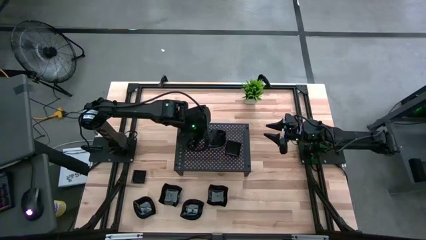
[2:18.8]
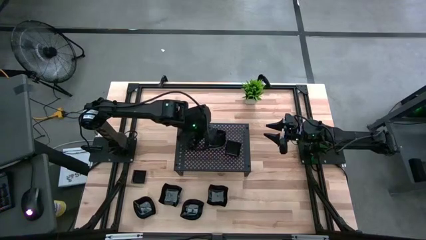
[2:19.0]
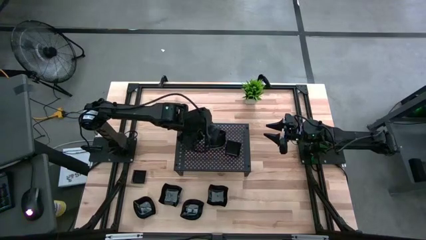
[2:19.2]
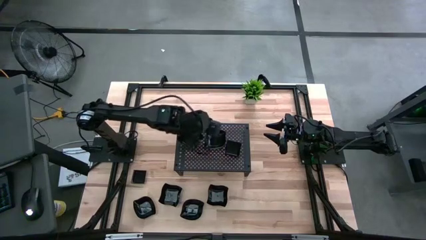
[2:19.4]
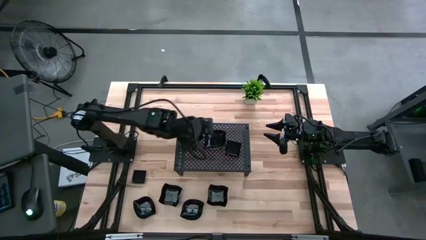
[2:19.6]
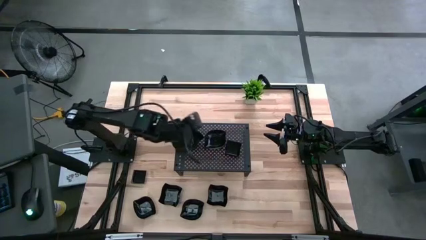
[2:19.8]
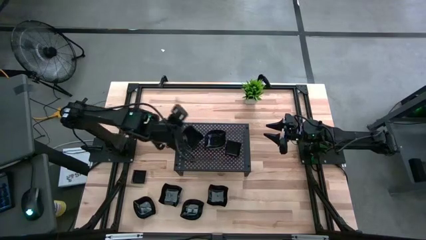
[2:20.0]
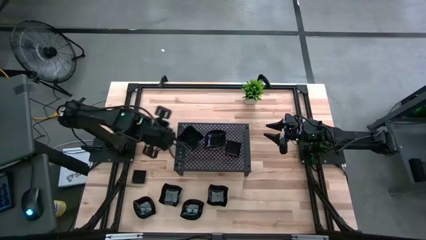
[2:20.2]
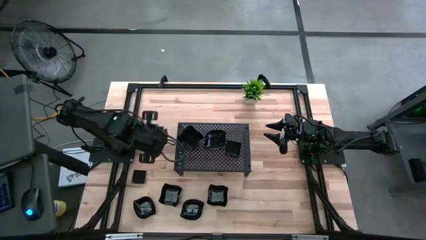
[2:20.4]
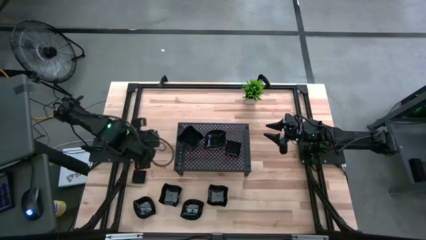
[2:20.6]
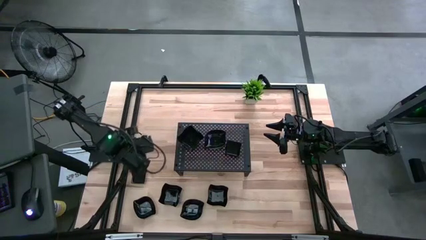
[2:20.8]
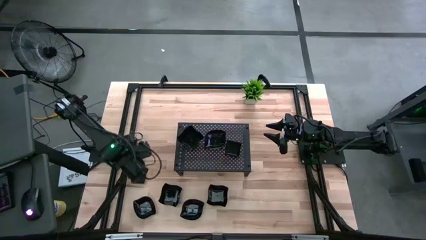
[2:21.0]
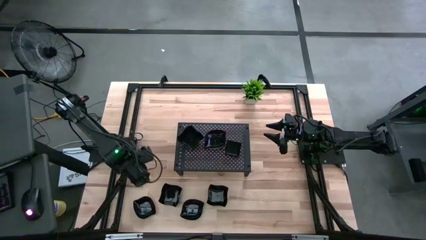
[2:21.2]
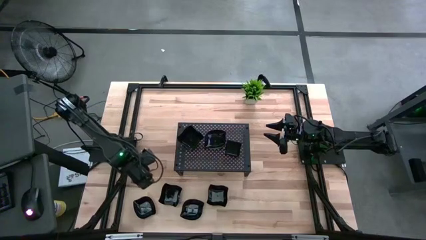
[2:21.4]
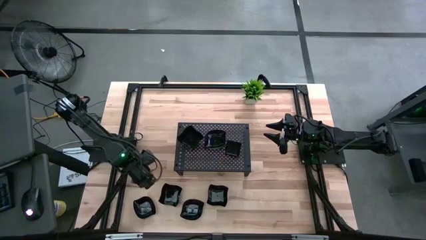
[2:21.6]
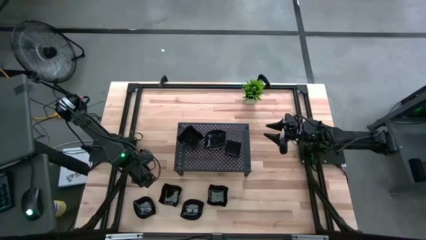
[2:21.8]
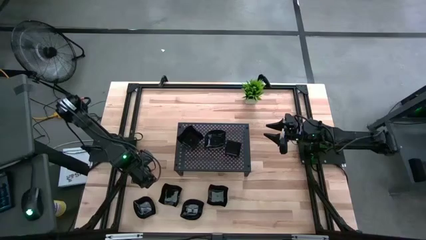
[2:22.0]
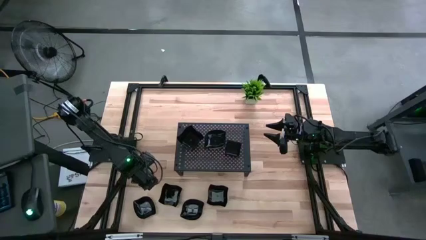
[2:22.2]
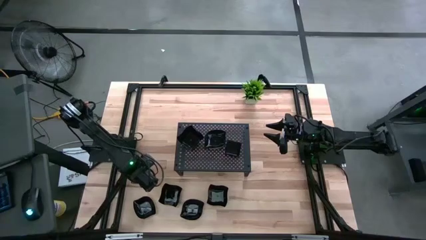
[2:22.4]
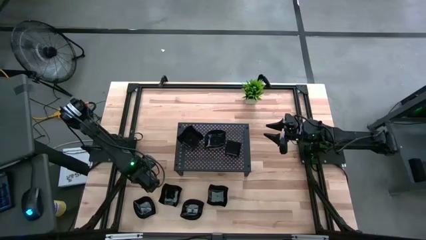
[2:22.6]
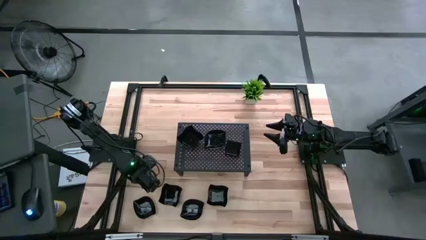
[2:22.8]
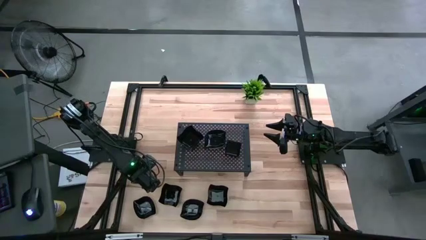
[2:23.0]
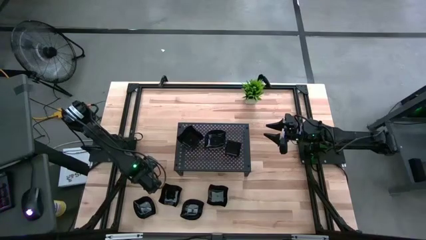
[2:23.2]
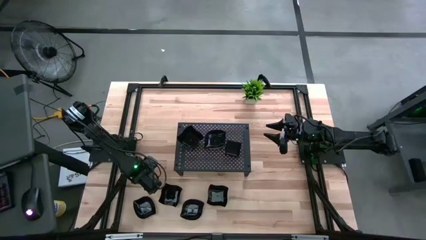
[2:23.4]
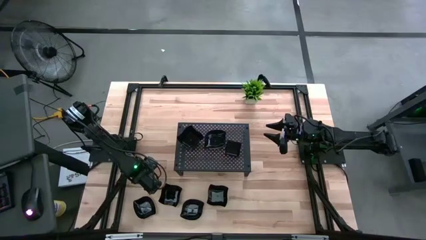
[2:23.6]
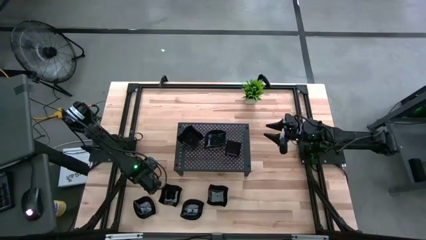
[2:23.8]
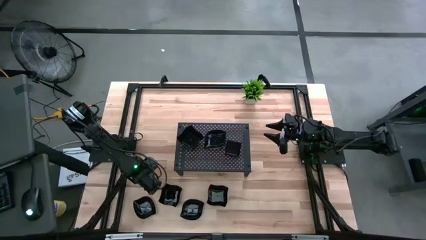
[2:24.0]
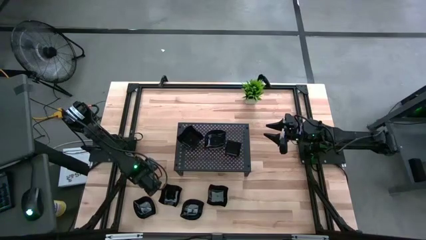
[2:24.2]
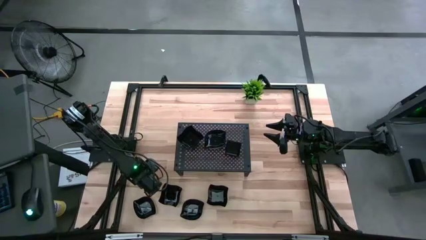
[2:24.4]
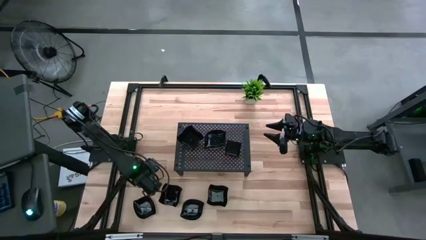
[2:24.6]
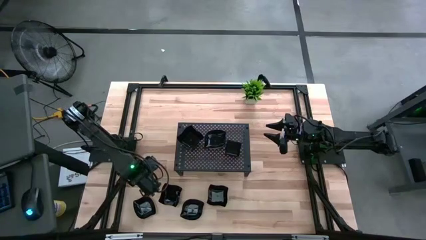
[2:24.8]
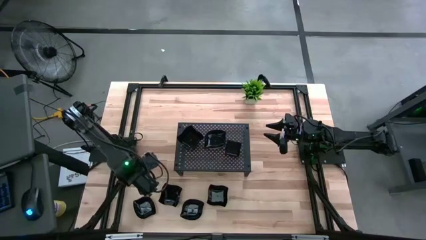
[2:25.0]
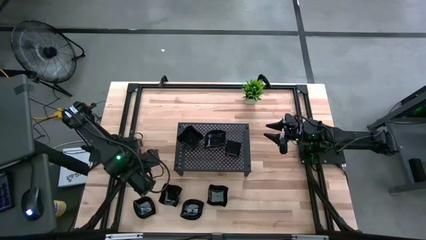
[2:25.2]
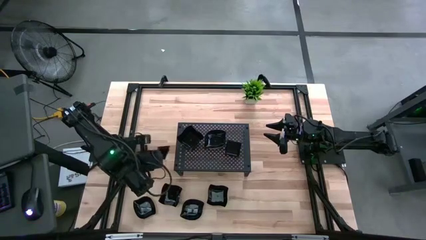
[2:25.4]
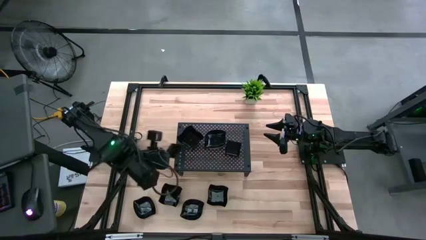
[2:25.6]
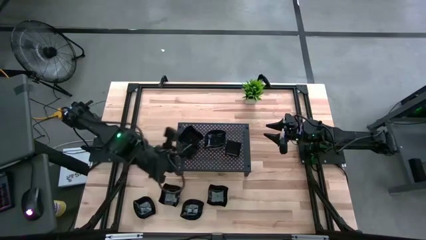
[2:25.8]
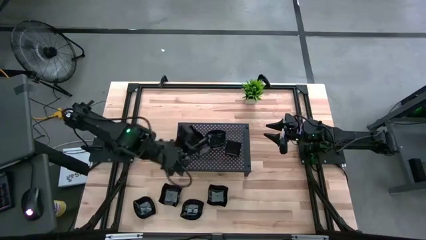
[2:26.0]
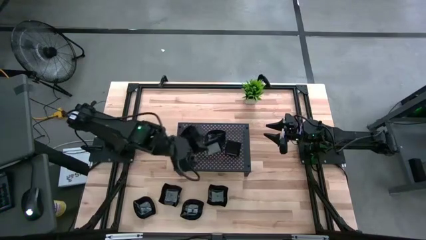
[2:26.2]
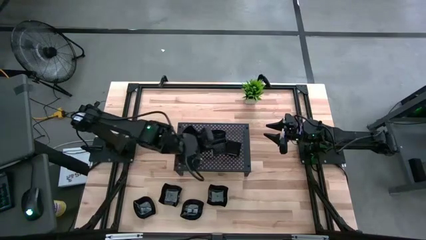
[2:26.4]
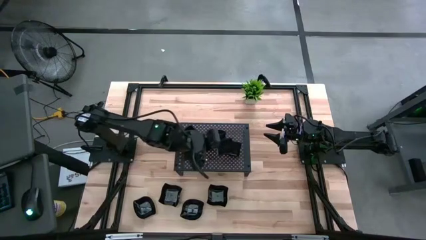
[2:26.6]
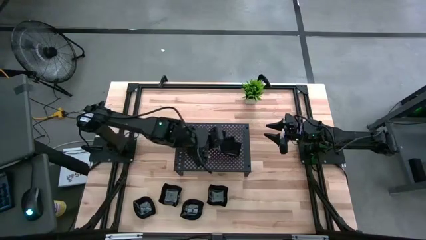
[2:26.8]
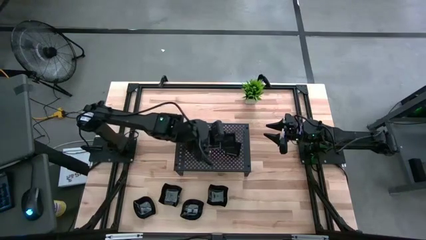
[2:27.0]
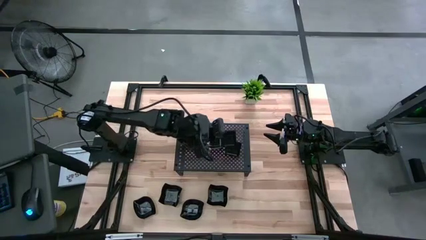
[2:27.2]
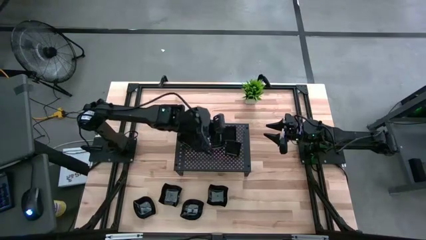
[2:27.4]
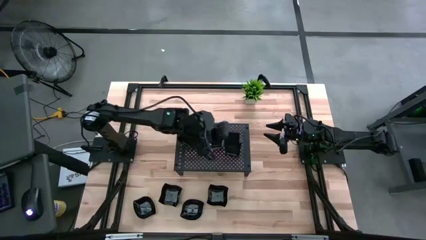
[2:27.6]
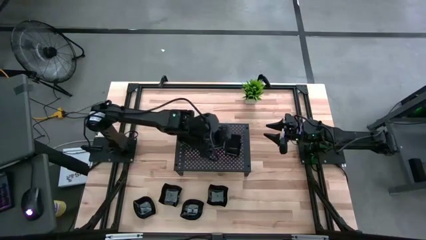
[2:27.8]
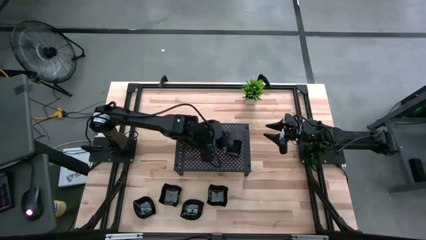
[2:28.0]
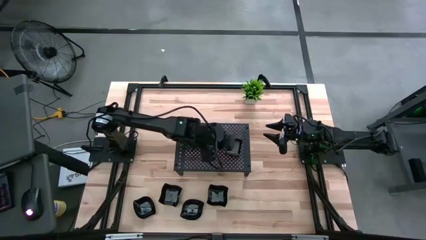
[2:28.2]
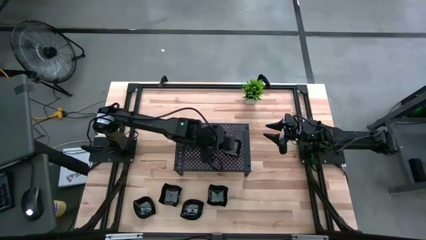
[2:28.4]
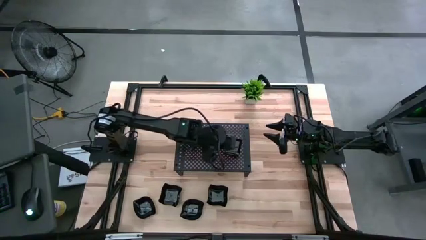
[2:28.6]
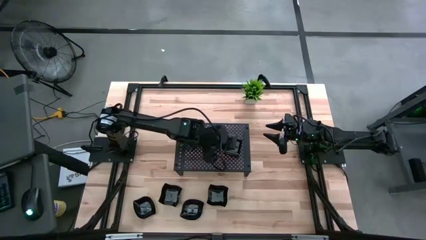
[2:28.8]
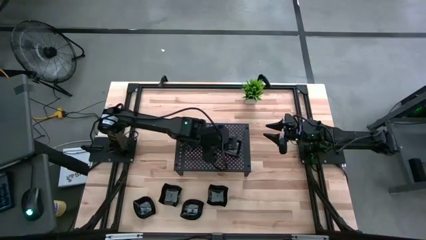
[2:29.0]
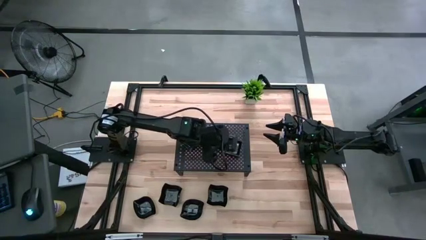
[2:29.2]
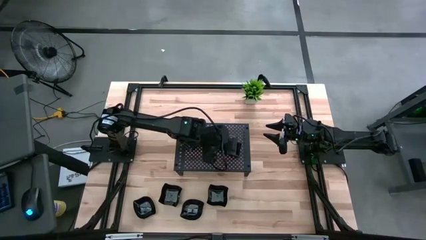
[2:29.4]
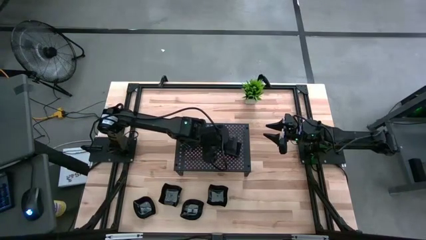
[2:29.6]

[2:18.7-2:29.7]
Task: Pick & Place Mini shaped plates
Stack the square plate on top of the square plates on the shelf
